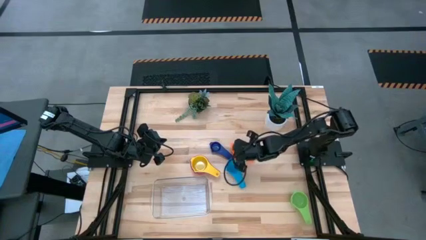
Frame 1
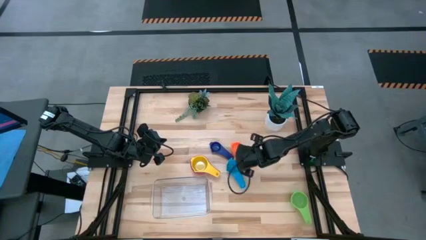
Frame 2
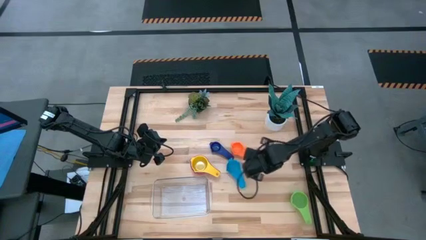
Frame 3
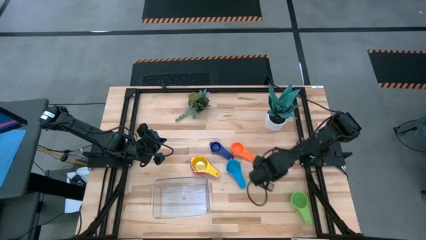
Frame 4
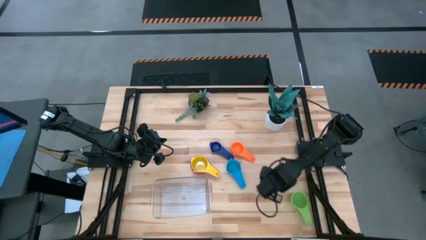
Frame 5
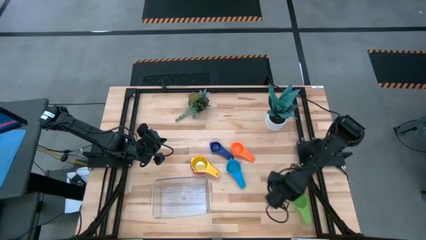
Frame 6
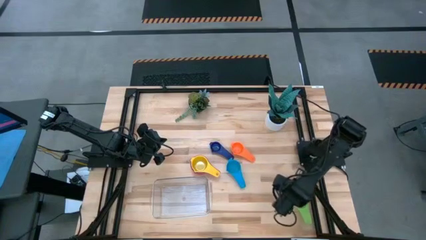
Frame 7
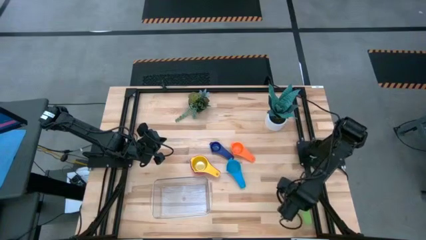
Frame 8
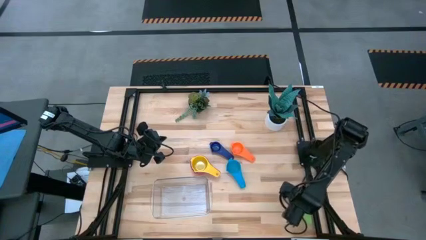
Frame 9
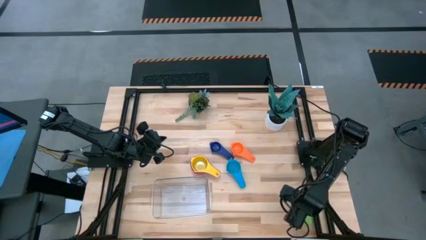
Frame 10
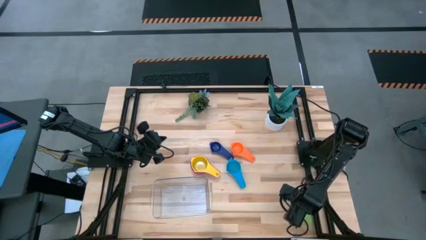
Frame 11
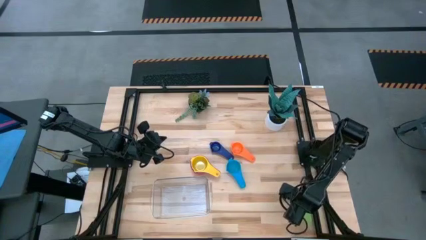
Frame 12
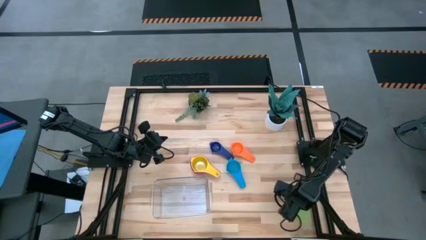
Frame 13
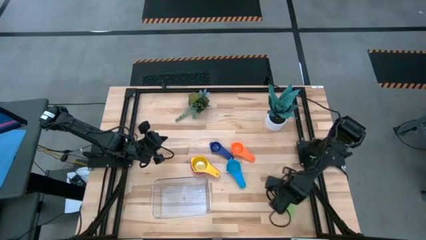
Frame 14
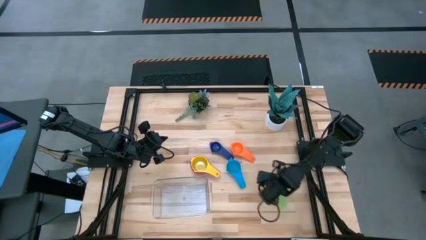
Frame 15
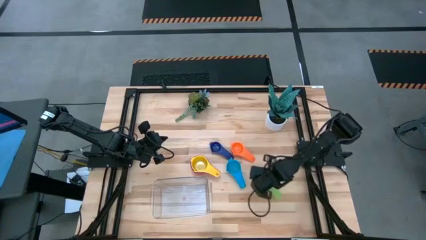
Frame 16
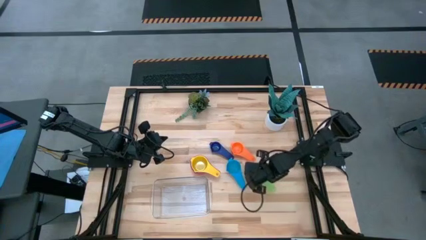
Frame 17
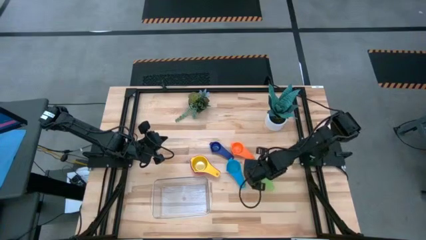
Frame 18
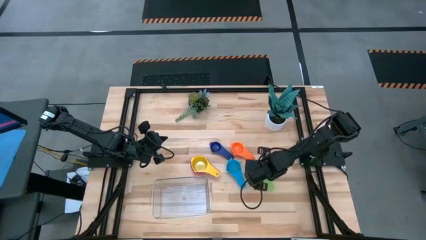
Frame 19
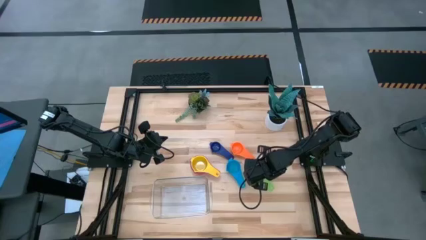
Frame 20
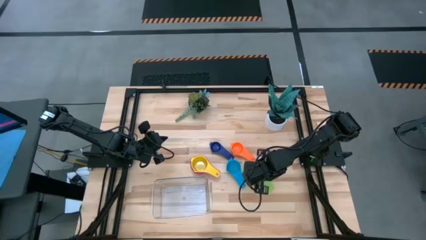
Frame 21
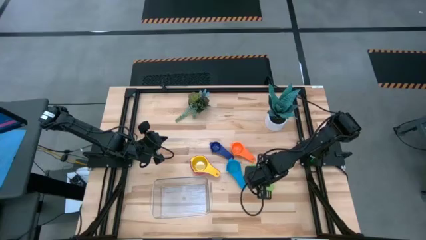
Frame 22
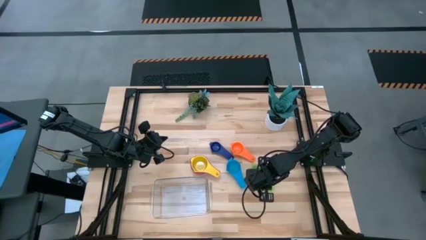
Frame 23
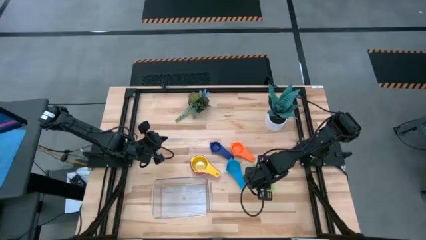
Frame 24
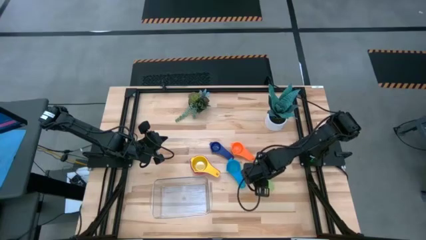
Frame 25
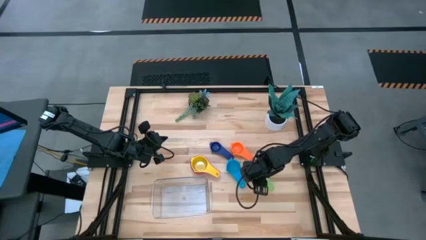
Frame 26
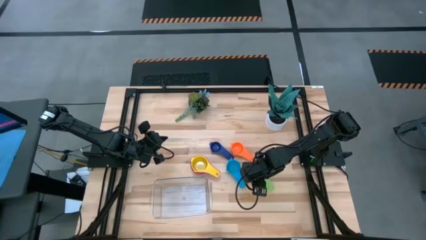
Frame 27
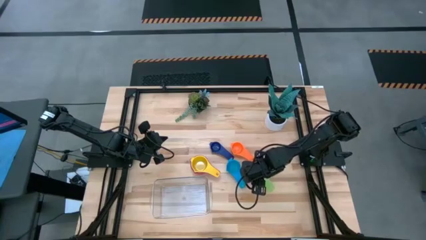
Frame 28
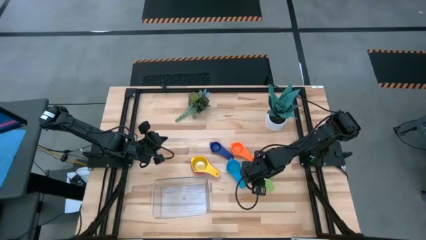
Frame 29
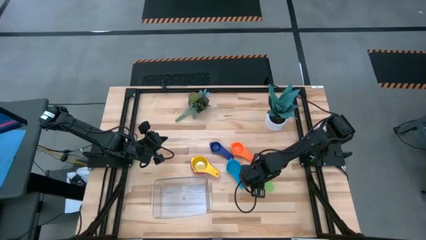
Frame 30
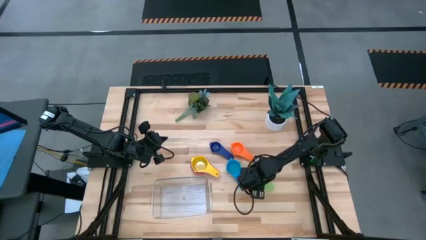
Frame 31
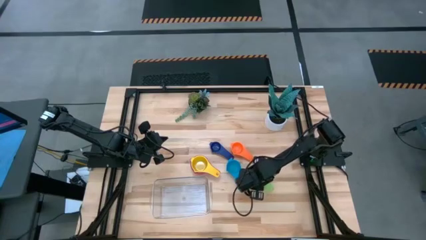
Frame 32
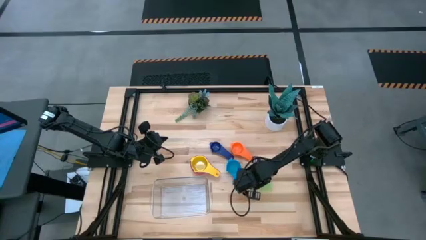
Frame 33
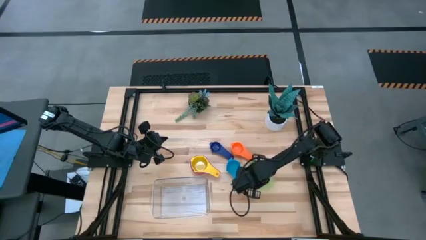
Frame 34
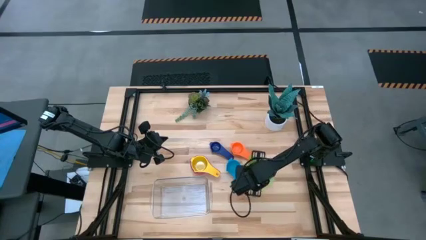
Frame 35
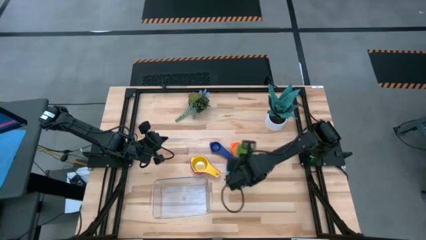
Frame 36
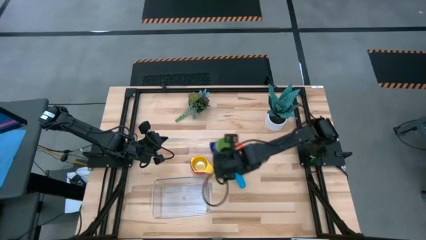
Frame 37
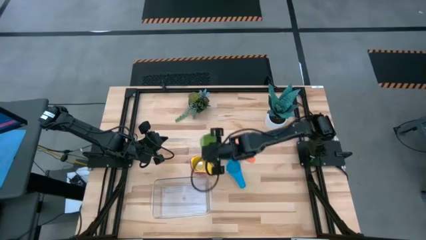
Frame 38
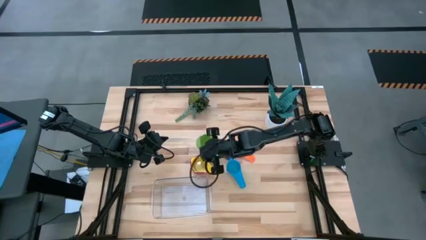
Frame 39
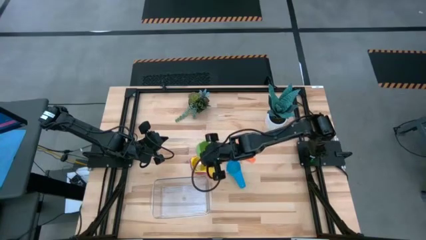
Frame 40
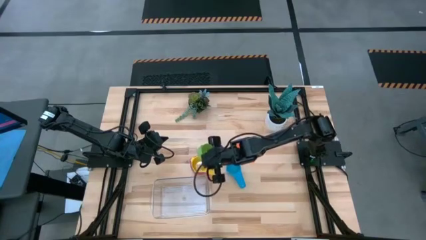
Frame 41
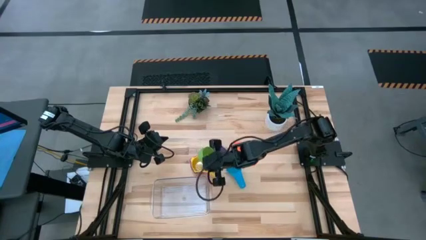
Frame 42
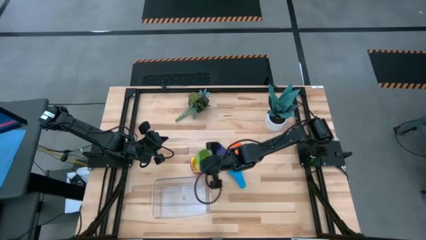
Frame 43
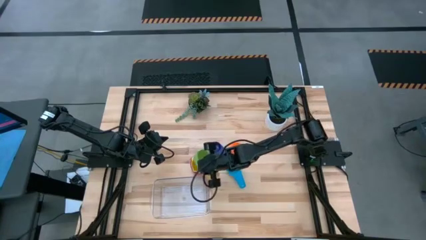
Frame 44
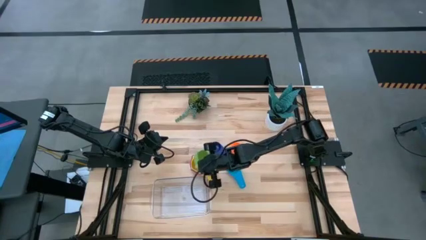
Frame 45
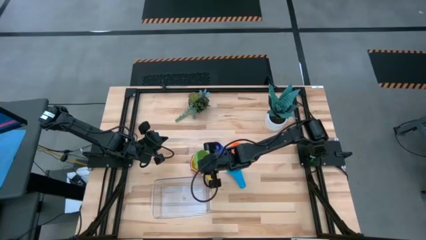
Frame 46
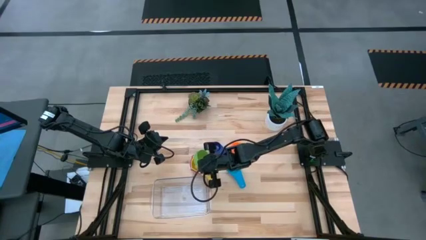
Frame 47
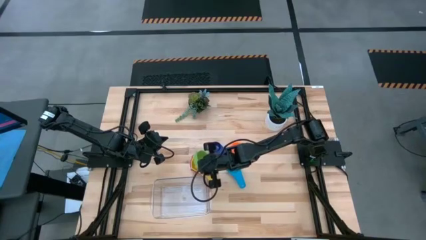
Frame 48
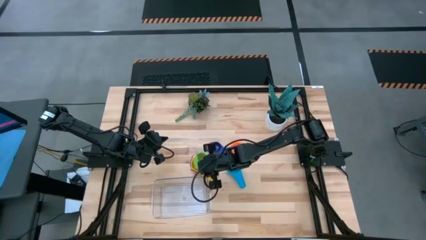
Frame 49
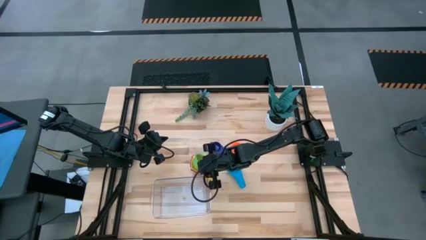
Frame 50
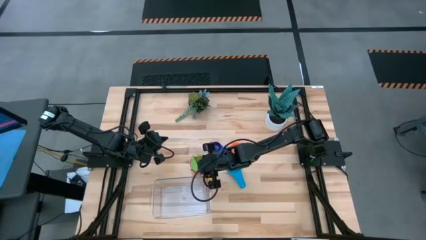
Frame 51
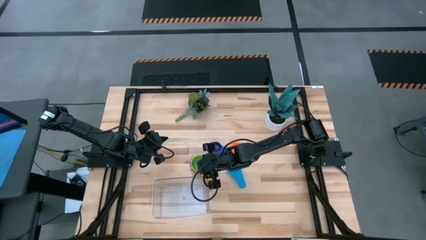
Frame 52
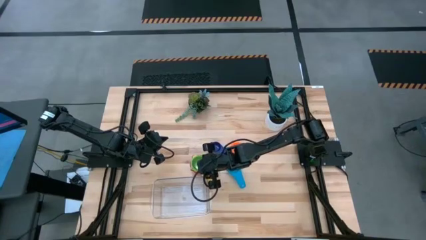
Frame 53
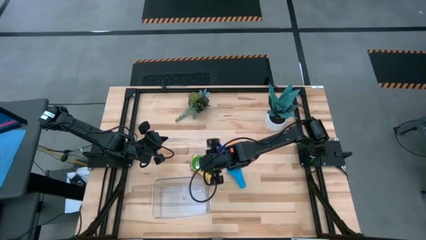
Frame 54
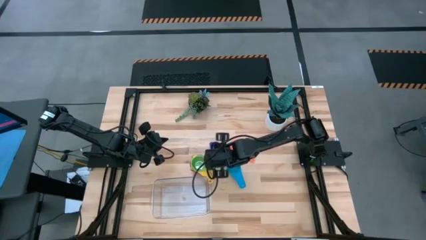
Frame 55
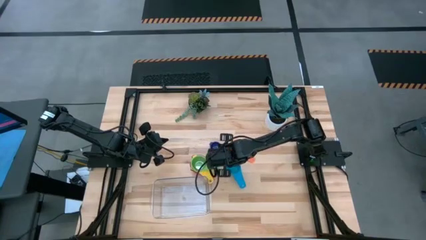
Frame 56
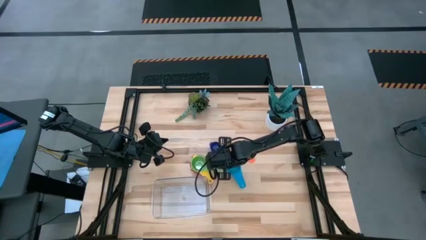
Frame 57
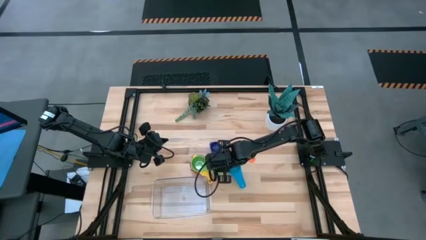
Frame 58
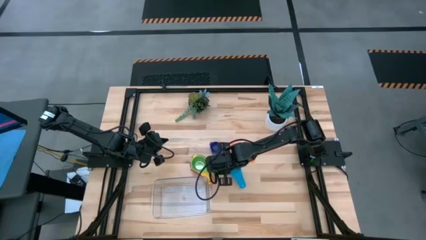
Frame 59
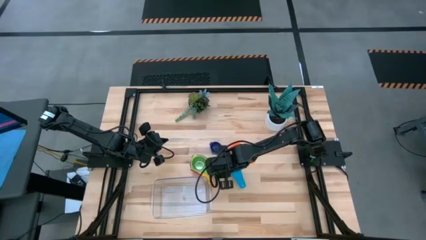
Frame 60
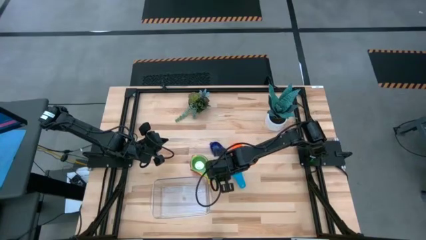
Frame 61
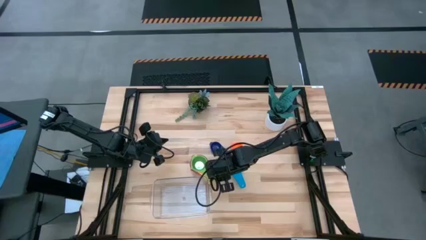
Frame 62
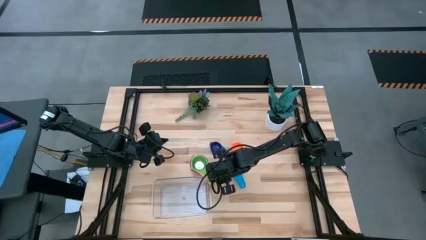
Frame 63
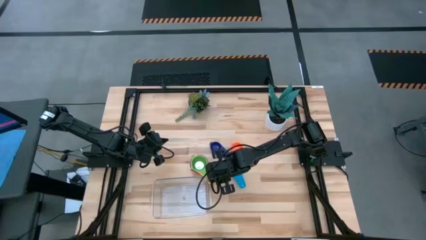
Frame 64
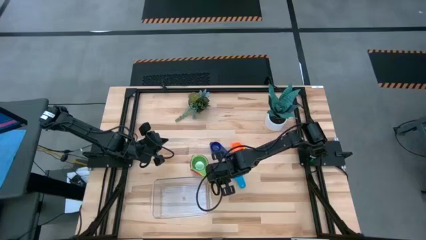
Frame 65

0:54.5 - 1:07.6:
Task: Nest measuring cups in basket
Stack the green measuring cup on the yellow measuring cup

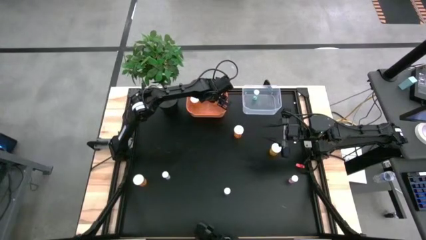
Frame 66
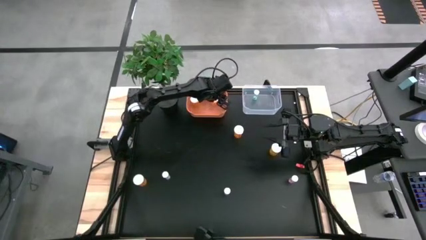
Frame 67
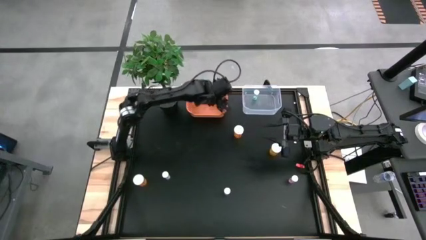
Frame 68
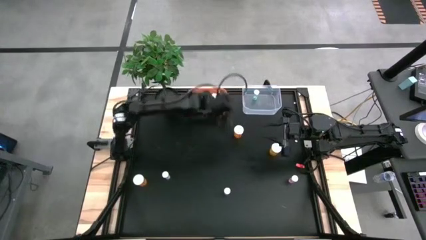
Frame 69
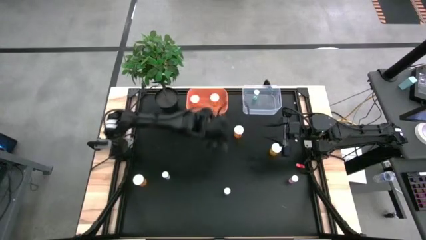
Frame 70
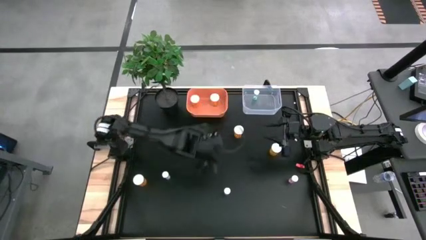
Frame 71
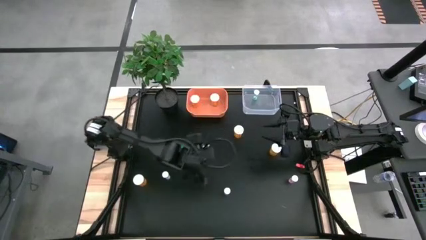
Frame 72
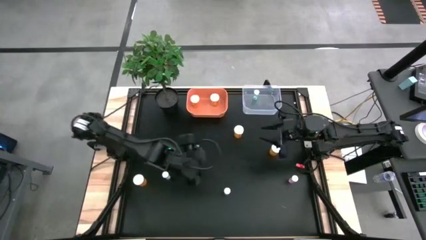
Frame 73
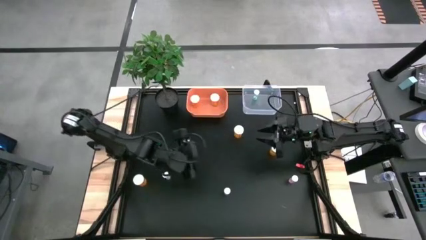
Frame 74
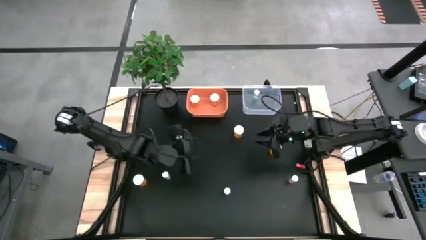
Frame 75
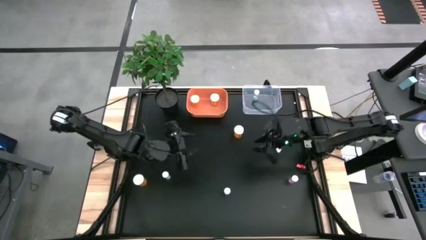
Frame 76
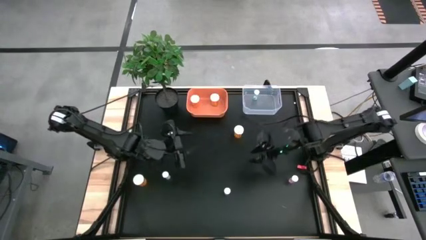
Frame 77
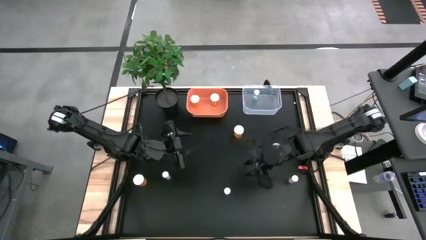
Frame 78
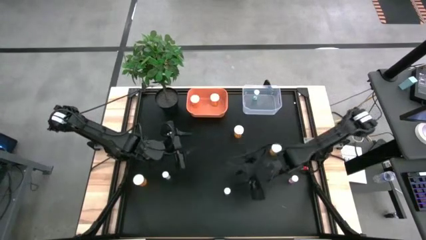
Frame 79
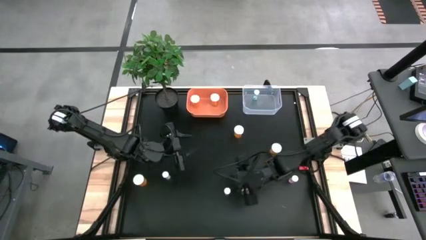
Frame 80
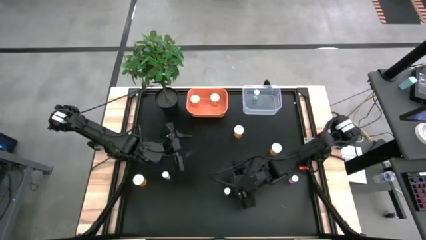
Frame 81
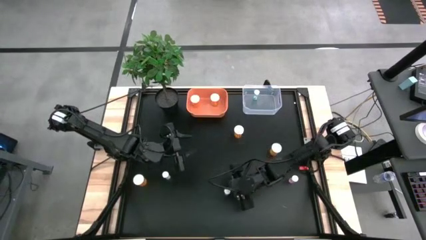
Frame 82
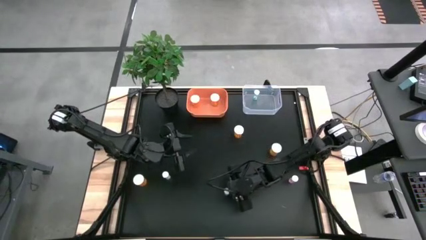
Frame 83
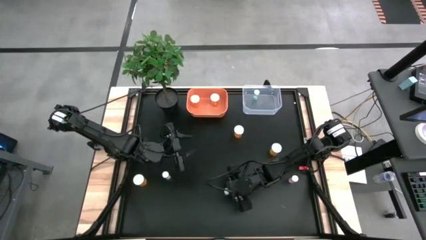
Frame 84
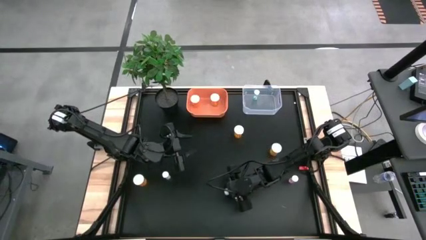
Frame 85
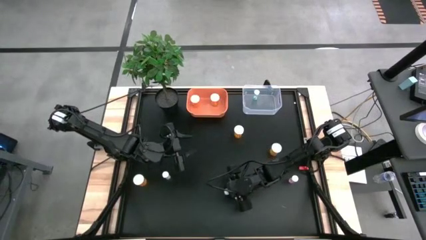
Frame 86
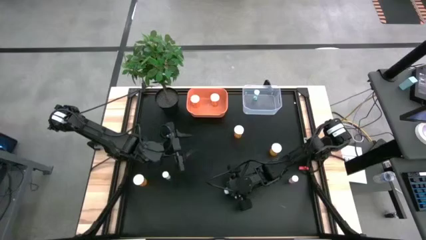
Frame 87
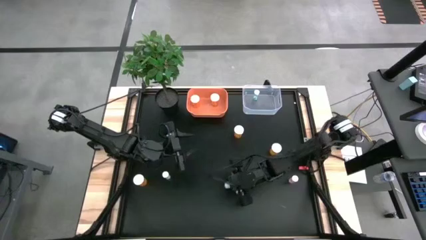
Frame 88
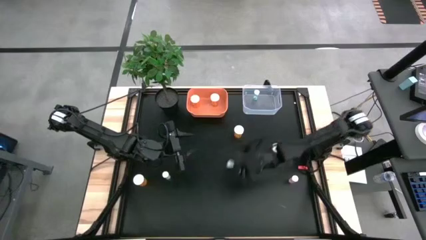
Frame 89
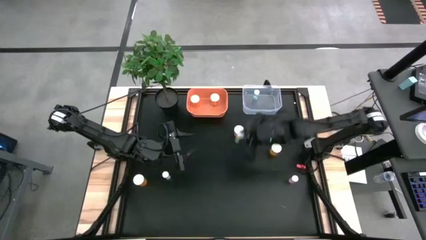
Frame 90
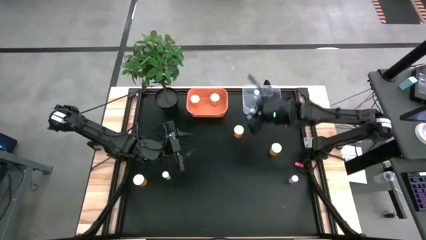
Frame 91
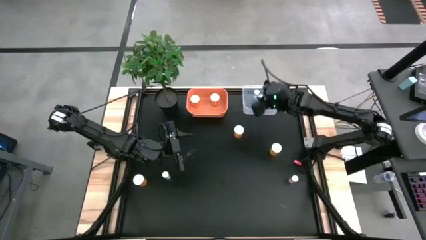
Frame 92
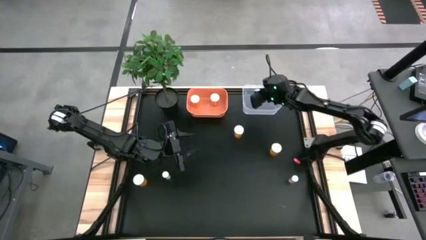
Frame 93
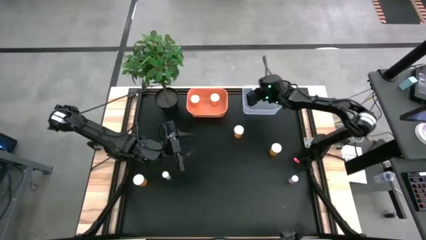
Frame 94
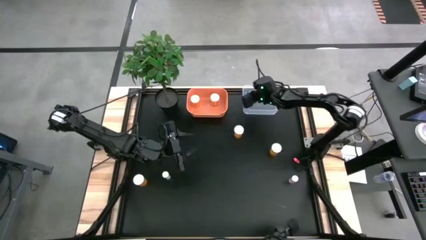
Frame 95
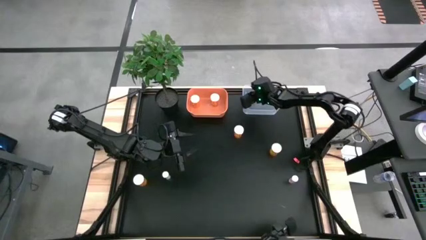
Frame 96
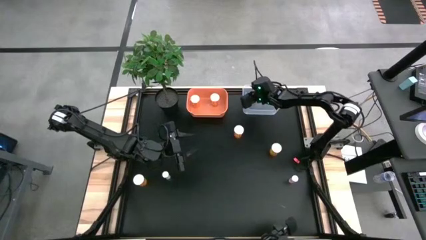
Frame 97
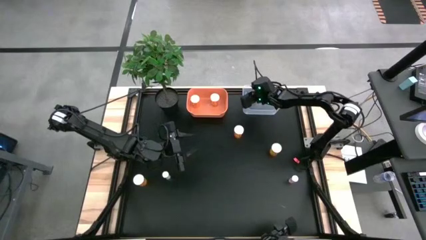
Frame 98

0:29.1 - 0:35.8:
Task: Pick and place medicine bottles into bin by pill shape (circle, oval)
Put the blue pill bottle into the transparent bin
